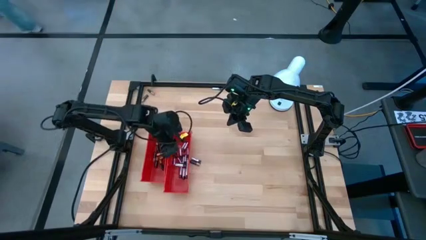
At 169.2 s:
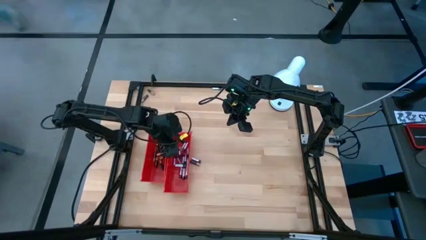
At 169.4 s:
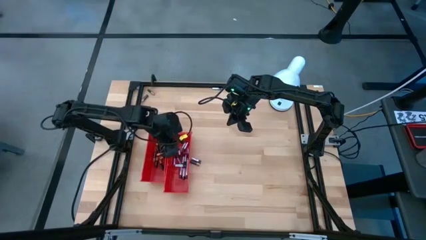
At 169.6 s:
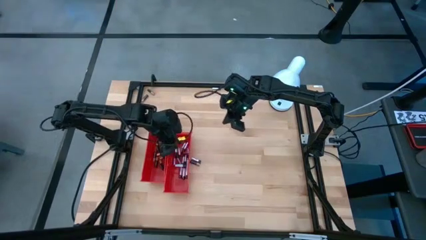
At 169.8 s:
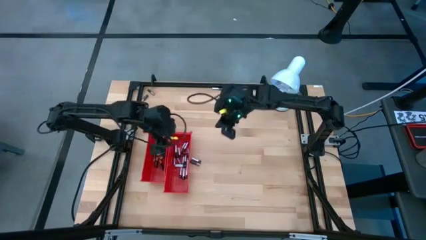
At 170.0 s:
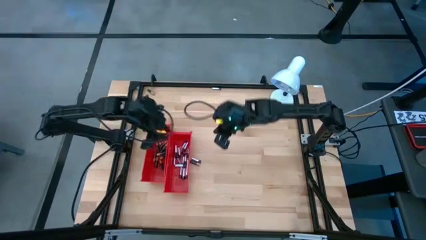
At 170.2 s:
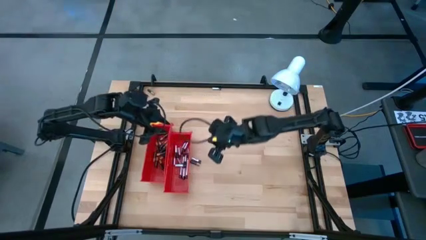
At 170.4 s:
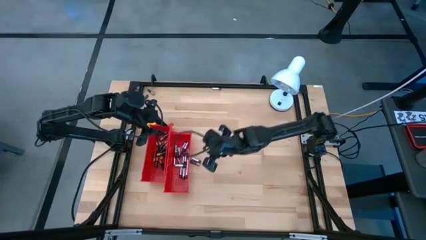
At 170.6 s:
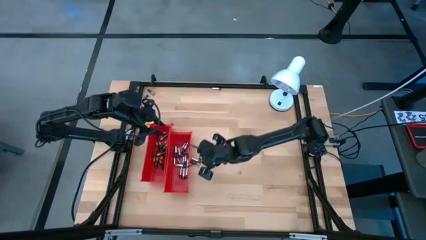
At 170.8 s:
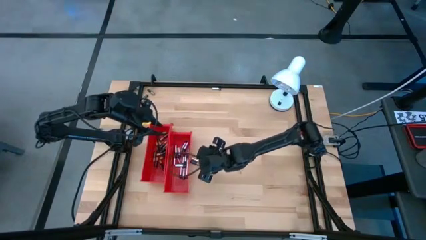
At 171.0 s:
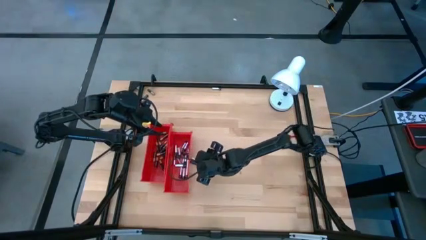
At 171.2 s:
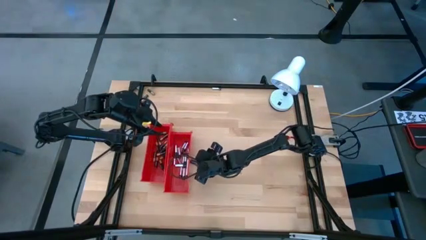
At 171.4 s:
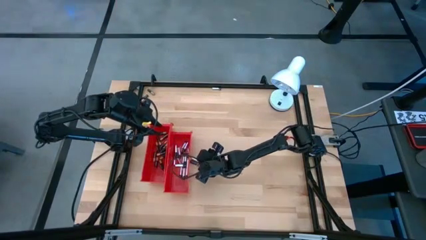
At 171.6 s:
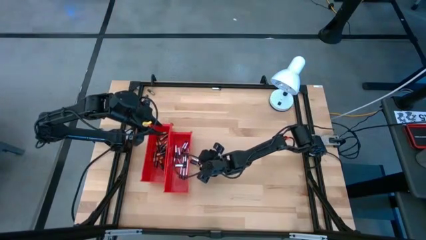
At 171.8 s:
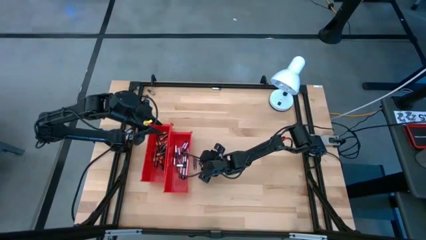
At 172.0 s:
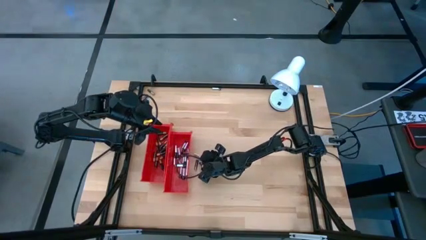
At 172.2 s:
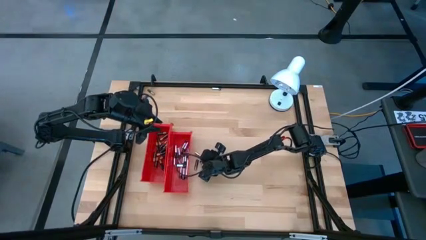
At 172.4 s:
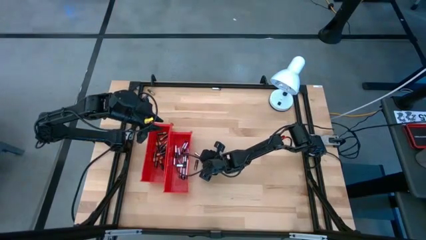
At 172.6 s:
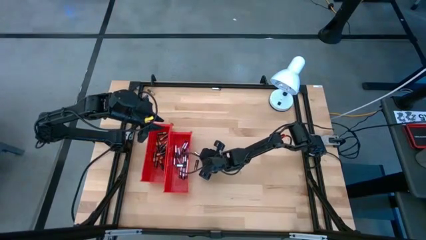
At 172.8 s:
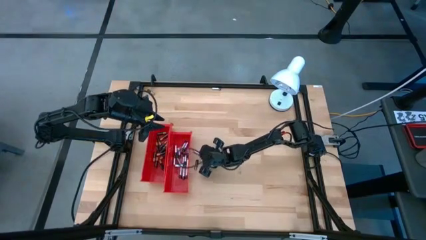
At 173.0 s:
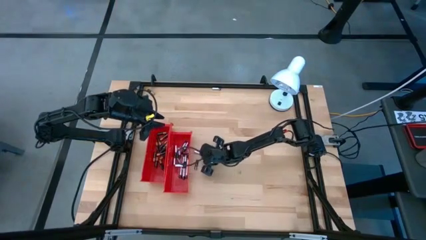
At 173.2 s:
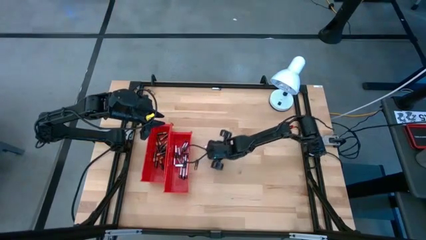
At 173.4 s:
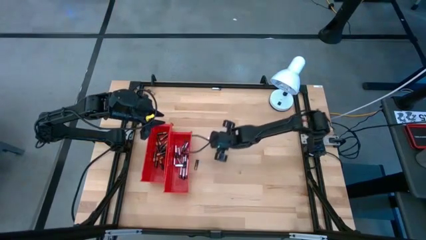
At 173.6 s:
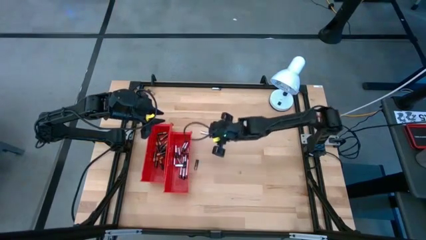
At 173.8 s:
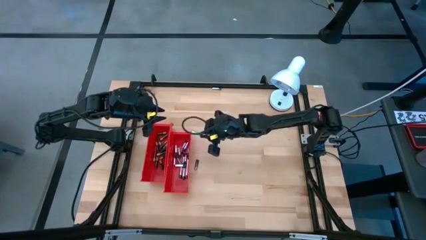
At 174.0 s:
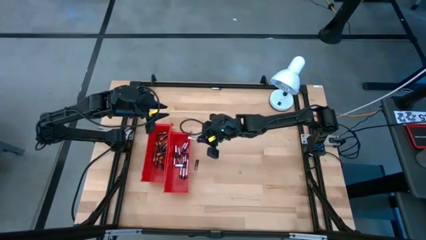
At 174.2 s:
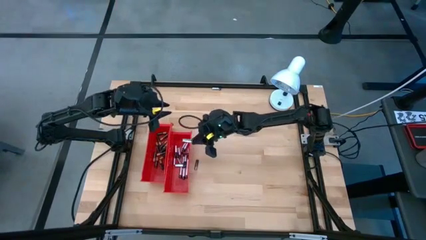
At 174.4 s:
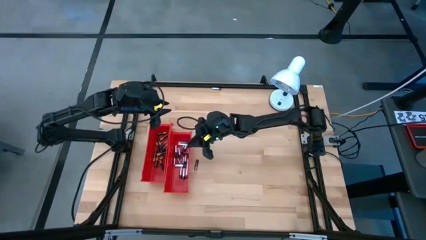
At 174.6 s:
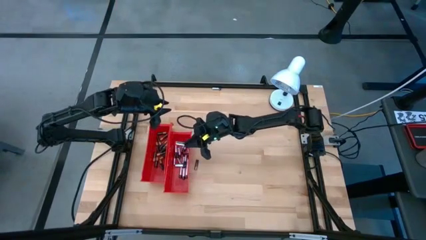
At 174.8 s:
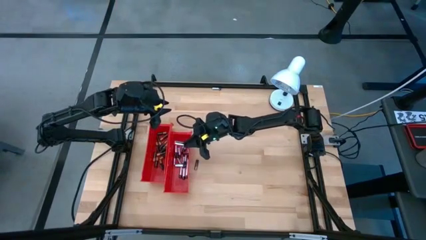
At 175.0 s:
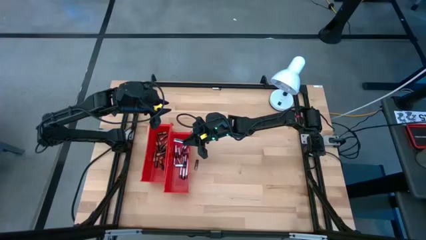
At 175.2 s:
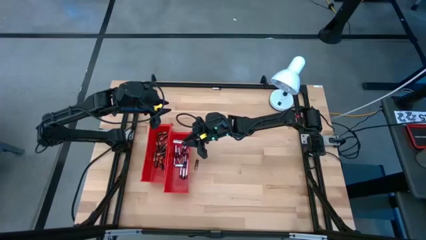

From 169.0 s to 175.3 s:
Task: Sort batteries
Put the silver battery into the right red bin

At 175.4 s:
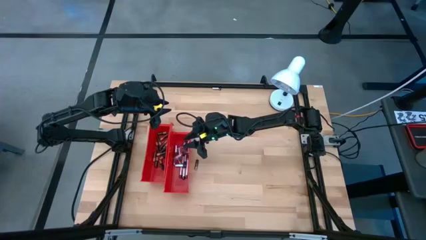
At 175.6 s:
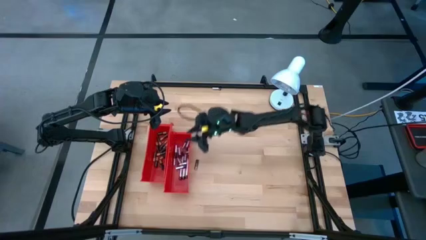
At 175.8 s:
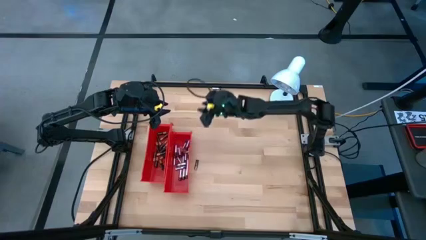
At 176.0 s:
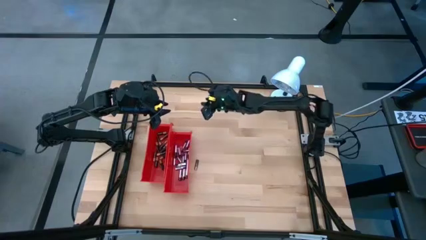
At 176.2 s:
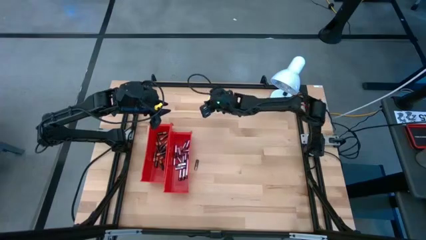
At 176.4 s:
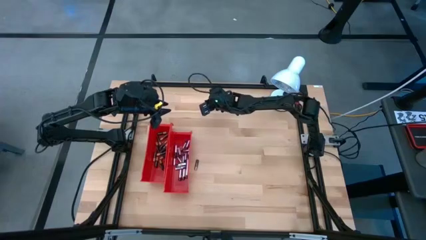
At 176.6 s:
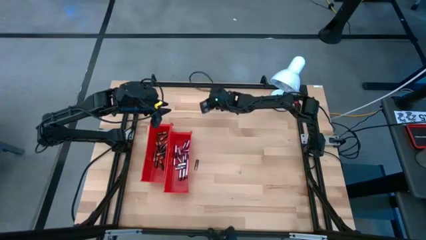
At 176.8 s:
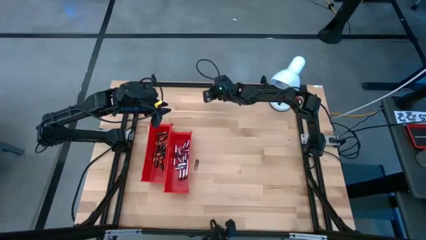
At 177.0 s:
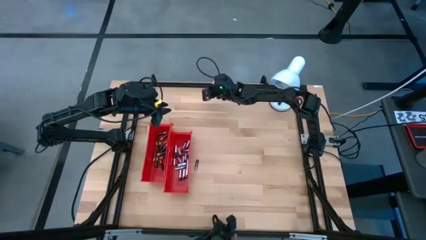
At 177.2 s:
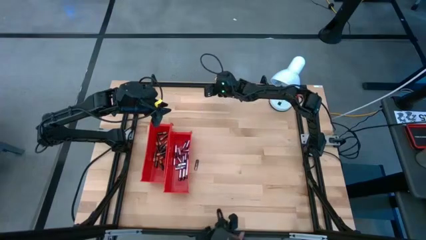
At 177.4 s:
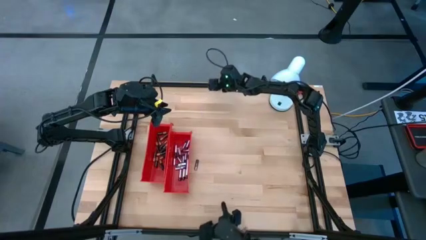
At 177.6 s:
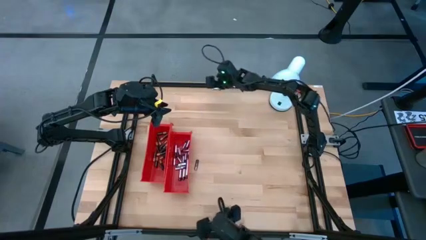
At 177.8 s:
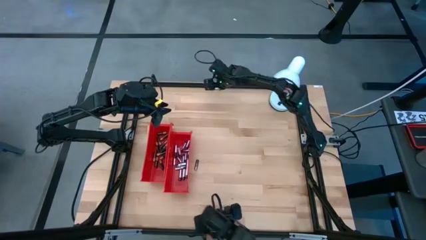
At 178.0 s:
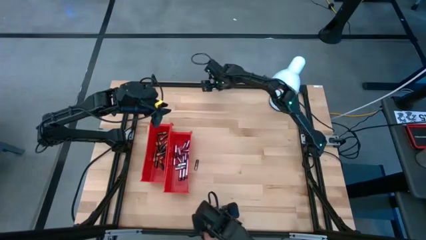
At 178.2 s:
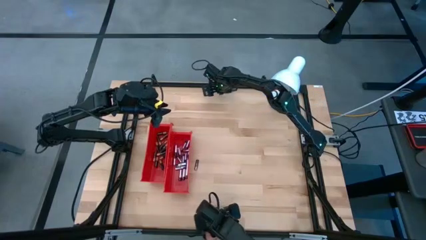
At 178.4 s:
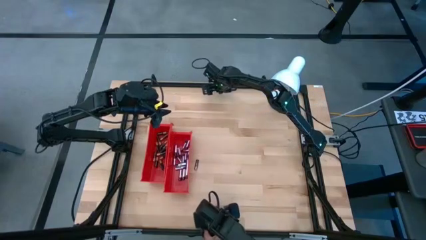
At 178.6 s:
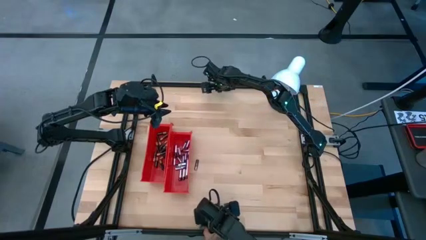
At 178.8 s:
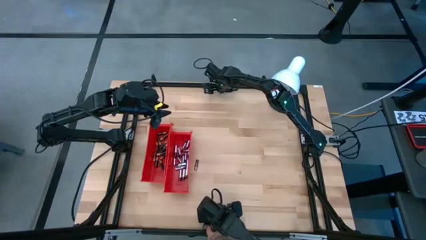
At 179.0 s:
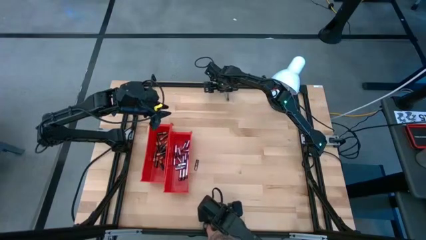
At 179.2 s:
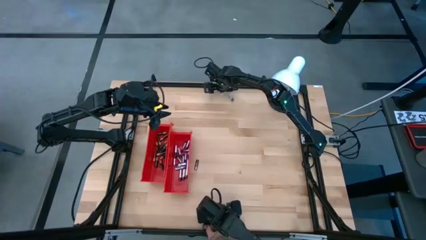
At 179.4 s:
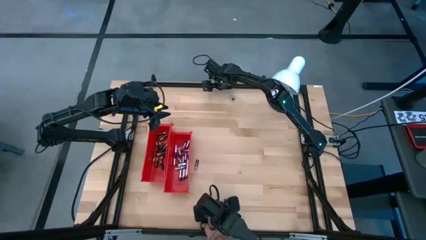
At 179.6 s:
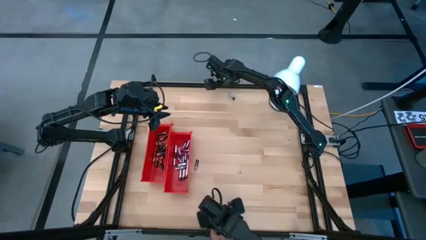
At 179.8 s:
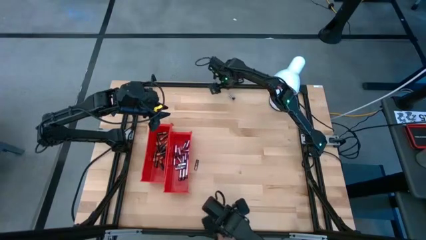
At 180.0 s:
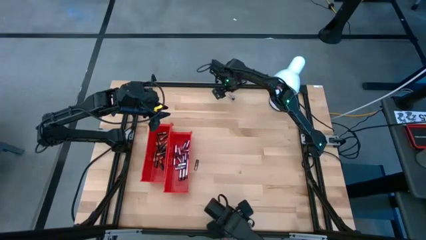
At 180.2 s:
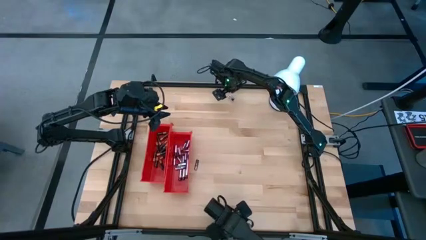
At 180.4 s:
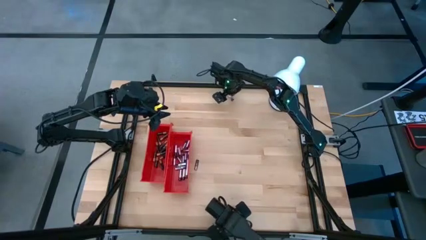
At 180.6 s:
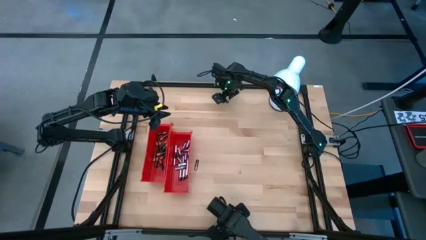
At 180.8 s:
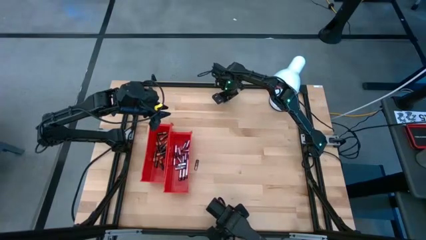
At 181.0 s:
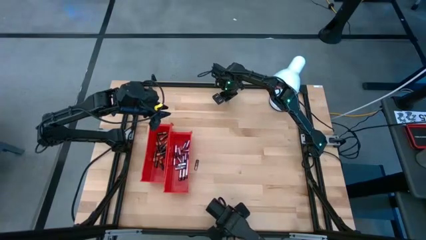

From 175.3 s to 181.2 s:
Put the silver battery into the right red bin

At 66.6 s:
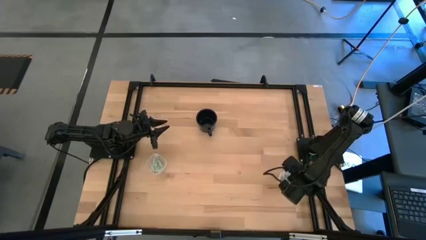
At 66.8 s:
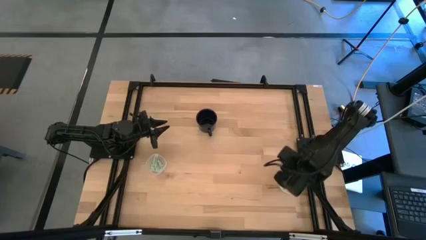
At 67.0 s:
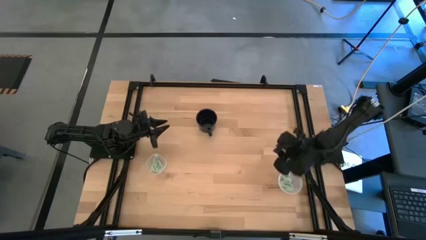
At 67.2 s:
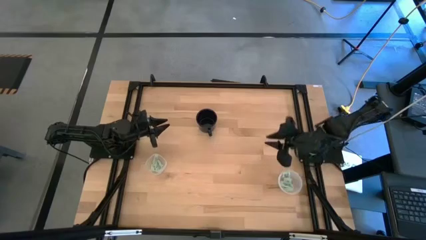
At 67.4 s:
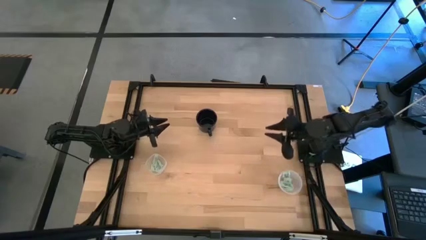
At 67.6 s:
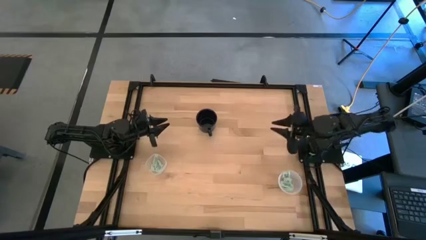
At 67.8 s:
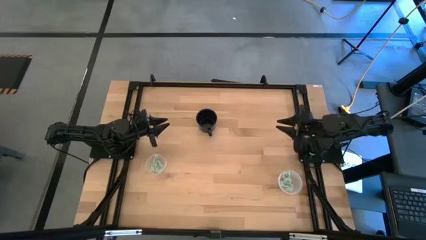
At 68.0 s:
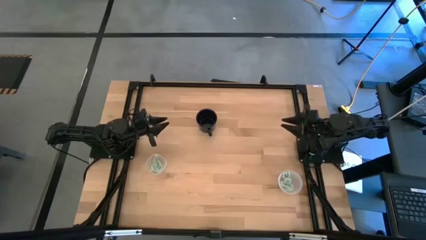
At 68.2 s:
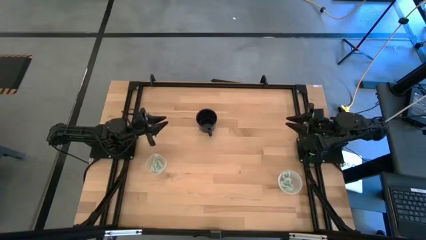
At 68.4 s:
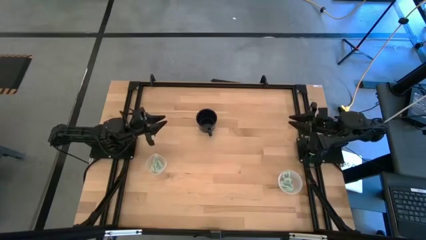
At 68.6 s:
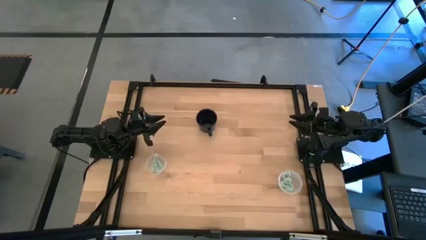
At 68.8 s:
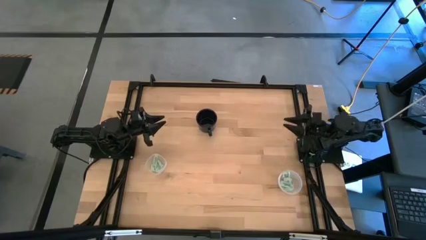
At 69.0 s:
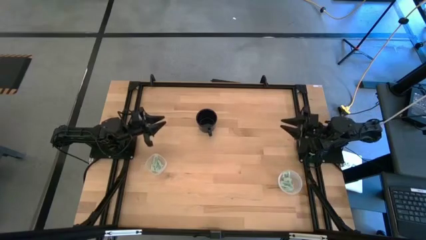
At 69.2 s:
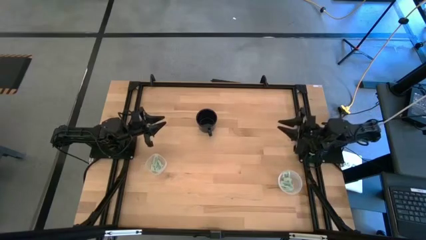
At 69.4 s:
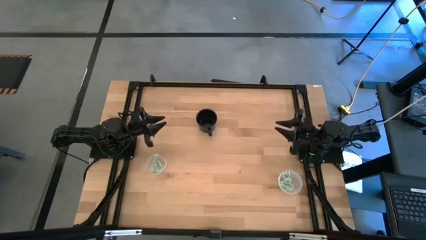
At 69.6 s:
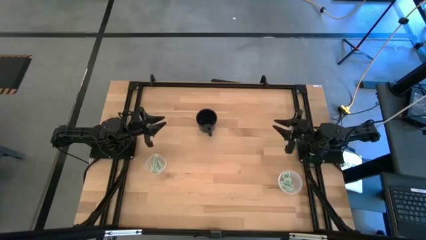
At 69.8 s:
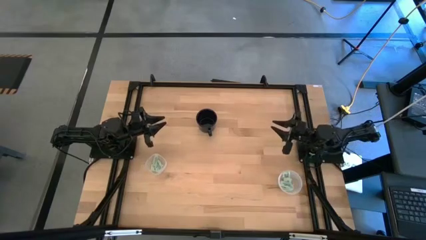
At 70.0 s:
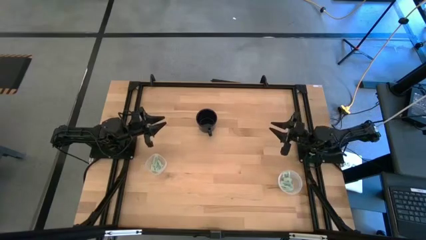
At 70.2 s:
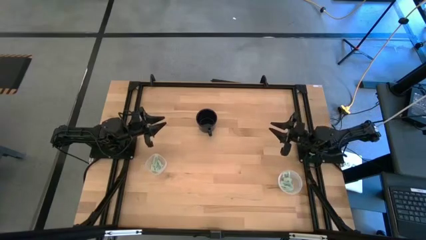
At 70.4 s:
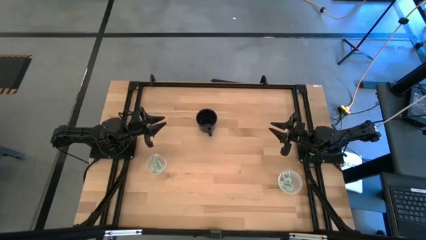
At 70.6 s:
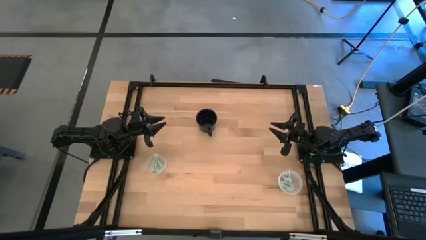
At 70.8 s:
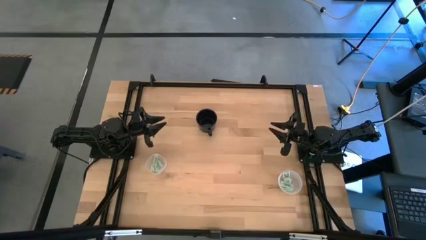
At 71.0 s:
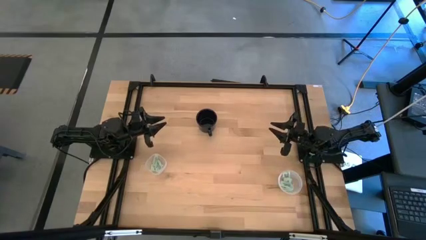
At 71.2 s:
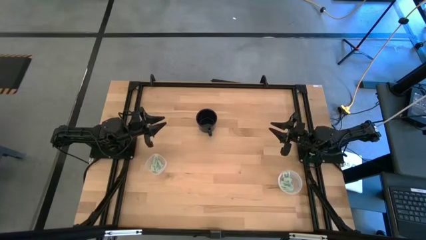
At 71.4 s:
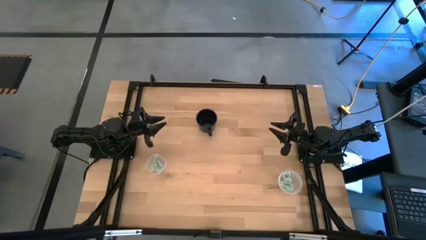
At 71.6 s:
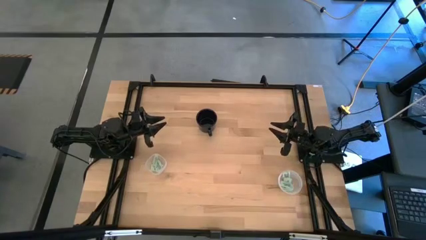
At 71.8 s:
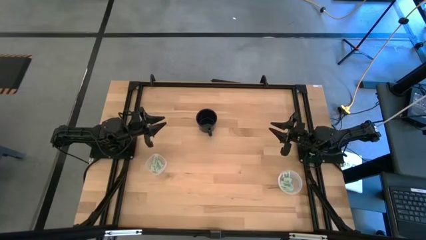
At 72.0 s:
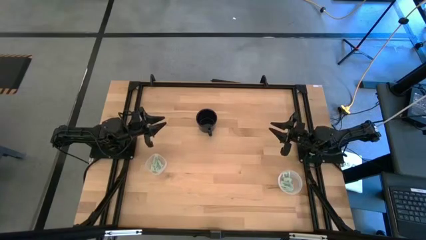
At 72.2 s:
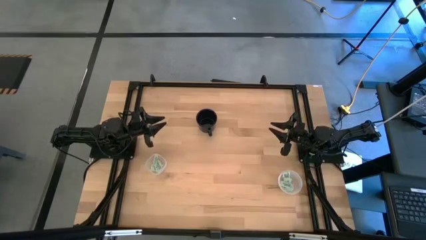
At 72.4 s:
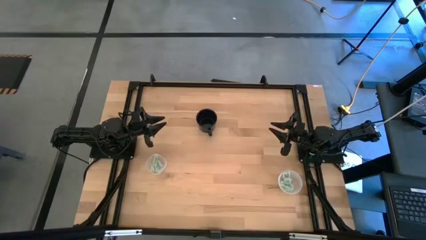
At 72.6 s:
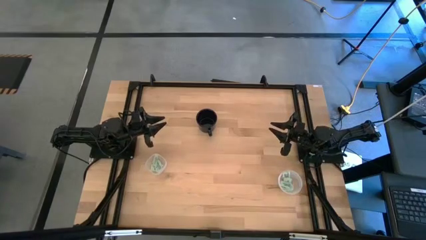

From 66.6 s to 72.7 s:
Task: Pick and place Stevia / Truvia into bins
Return to Home Position
